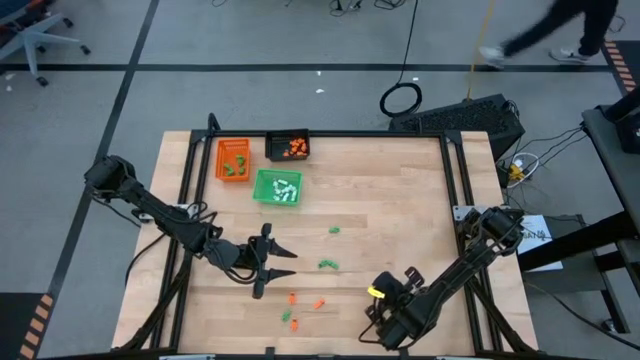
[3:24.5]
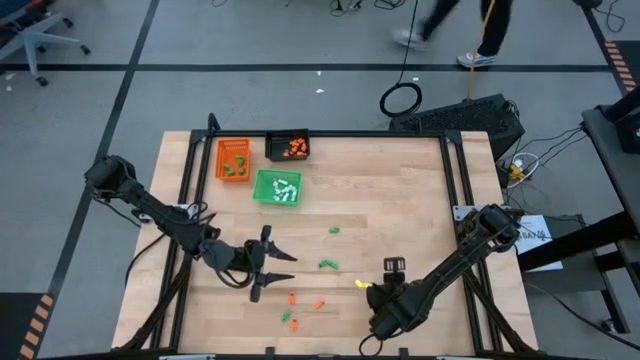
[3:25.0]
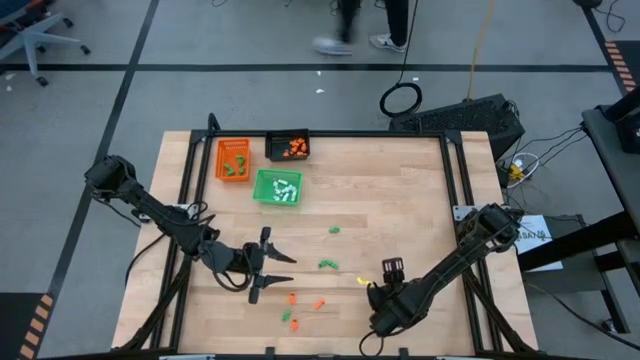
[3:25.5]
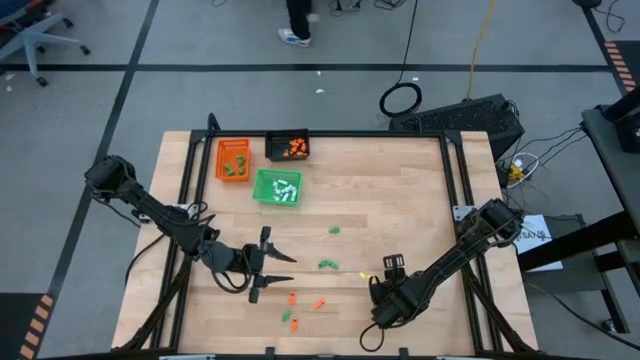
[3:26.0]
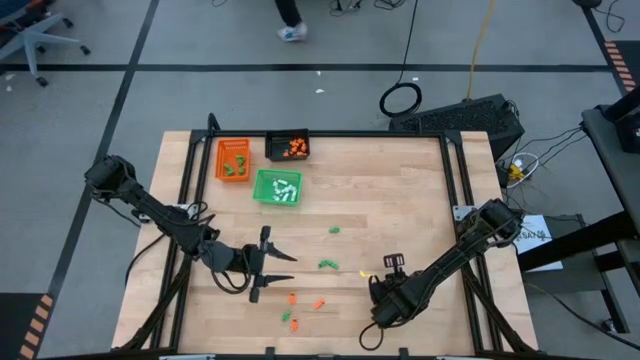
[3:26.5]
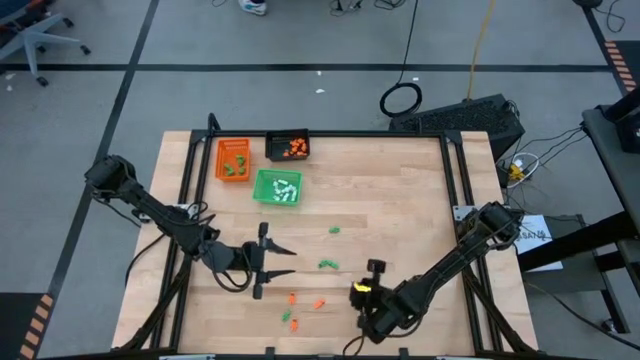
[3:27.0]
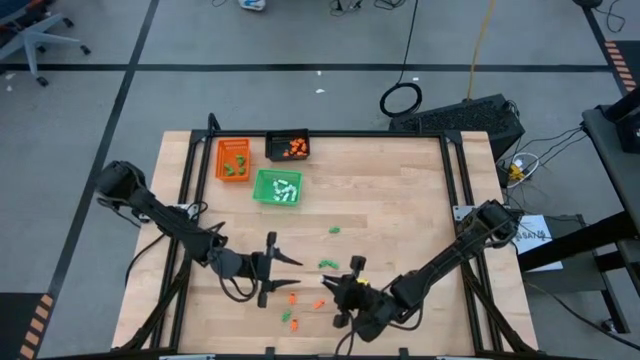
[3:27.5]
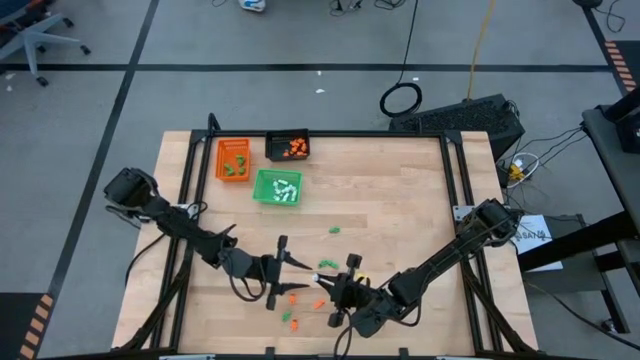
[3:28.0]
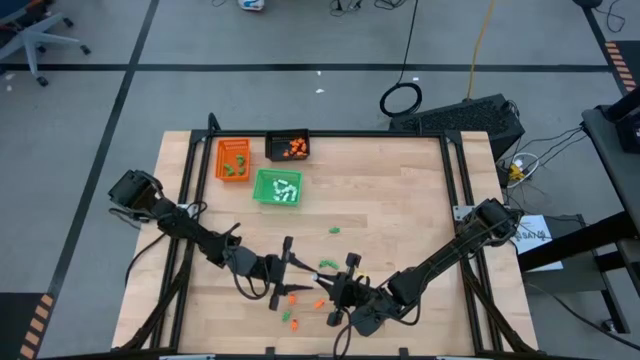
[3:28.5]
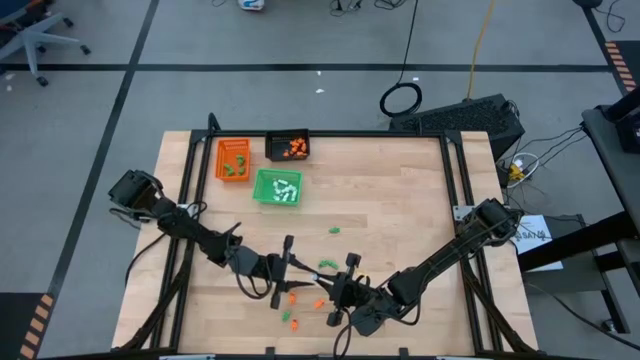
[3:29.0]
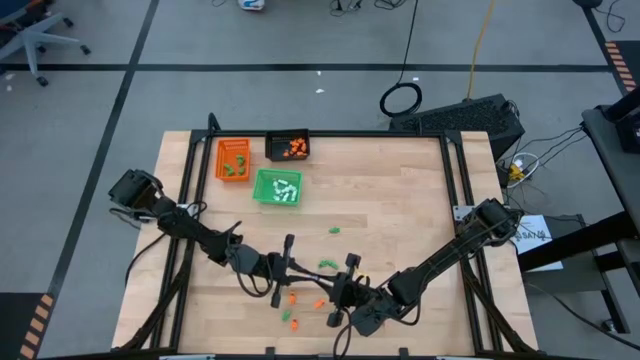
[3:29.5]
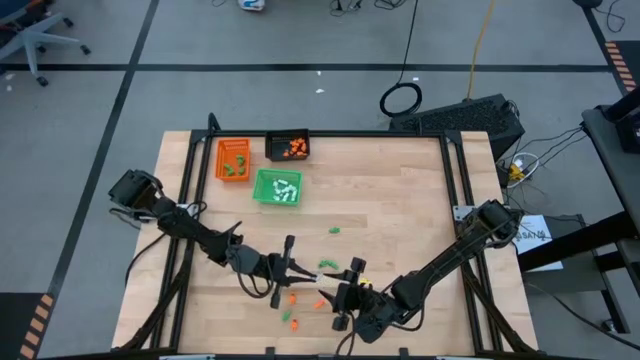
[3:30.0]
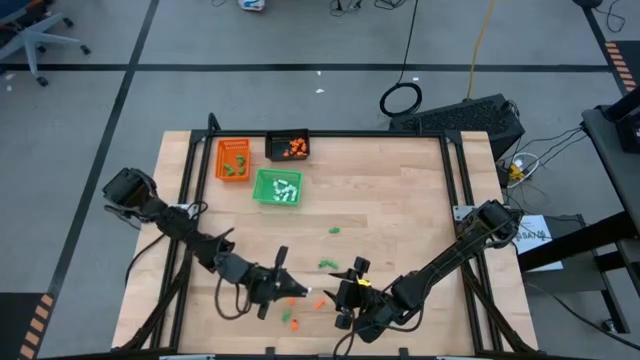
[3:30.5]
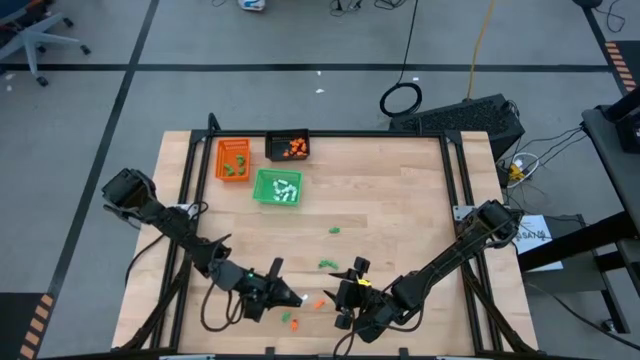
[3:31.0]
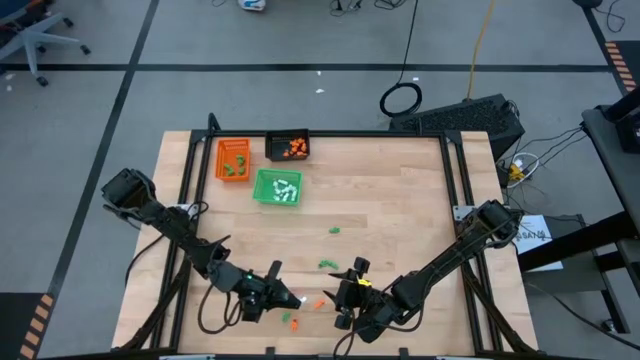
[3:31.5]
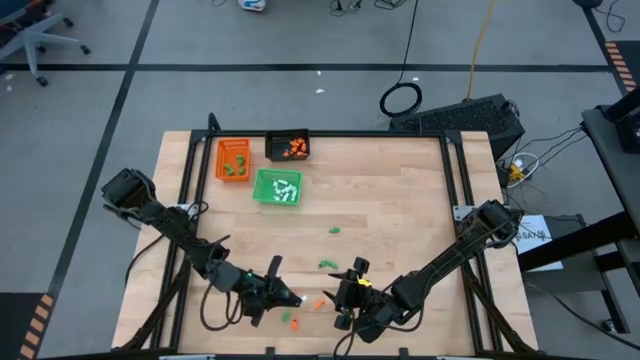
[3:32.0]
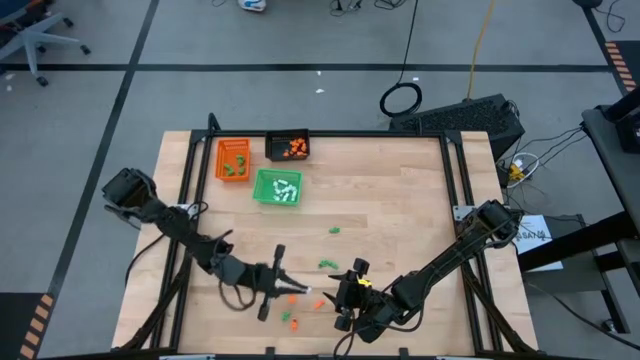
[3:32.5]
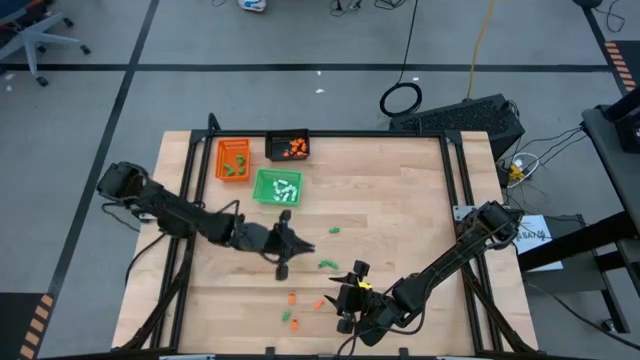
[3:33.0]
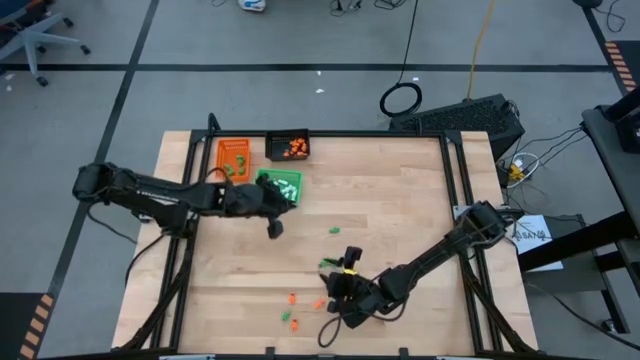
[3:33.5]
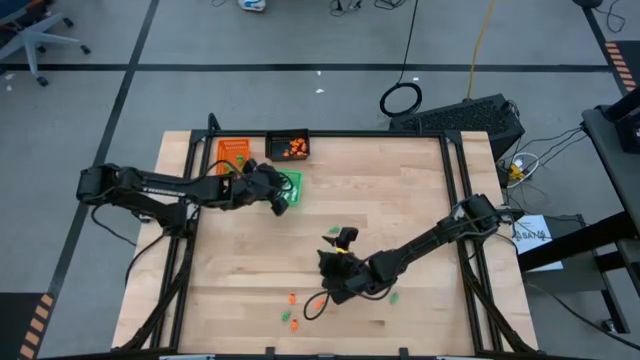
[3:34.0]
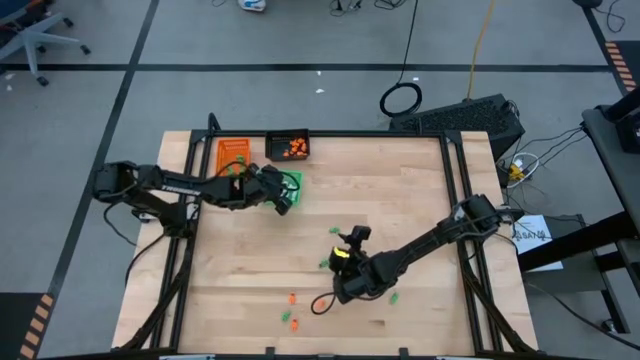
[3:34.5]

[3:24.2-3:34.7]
Task: Sort Halloween decoration
Put the white skeleton toy into the green bin

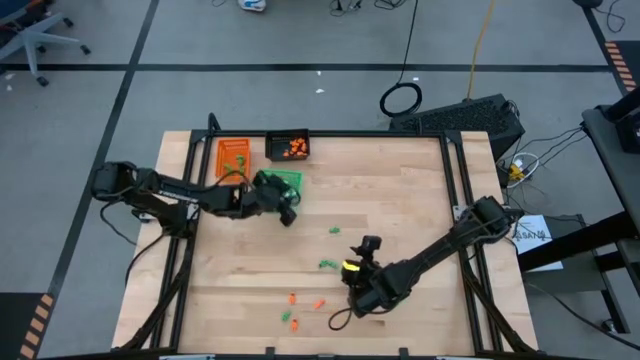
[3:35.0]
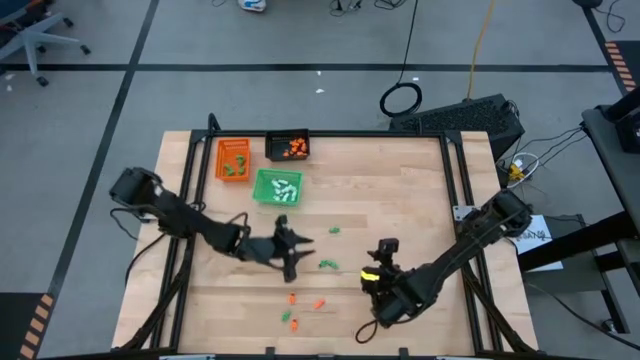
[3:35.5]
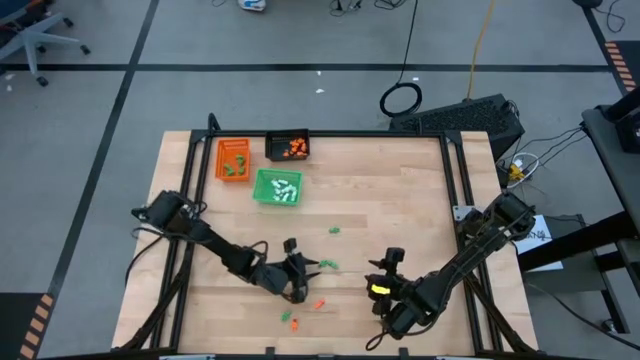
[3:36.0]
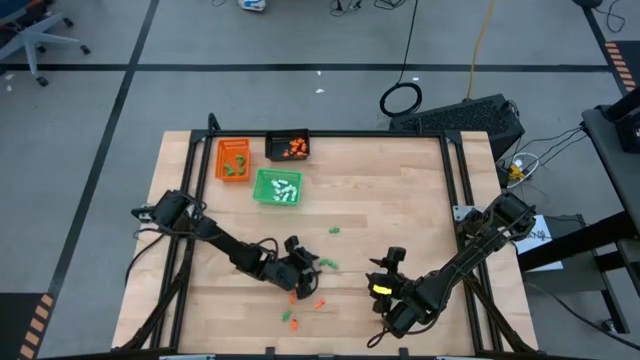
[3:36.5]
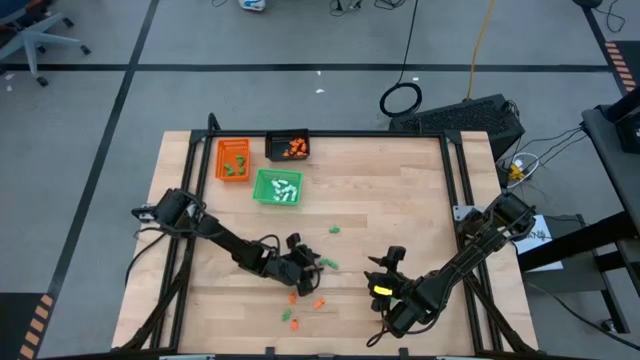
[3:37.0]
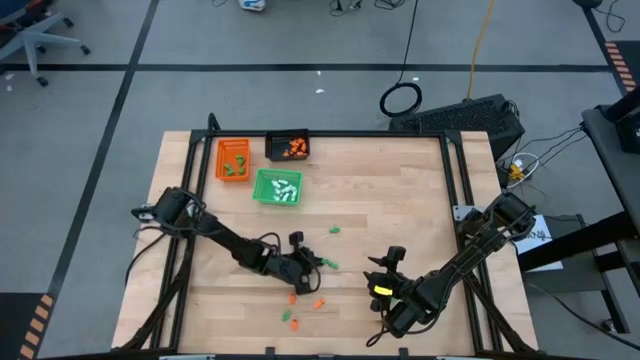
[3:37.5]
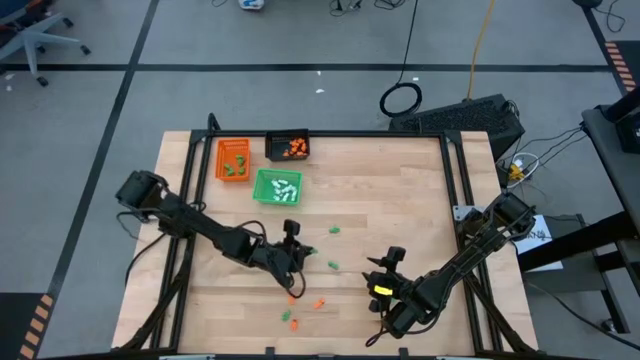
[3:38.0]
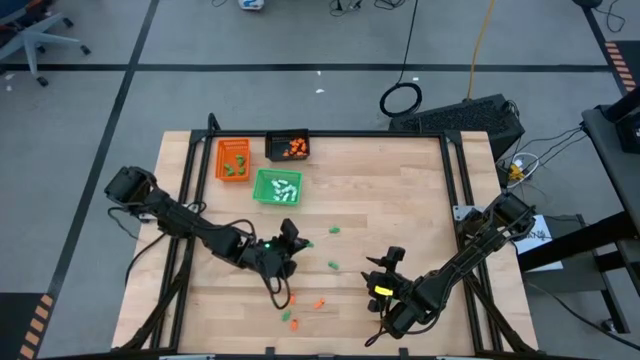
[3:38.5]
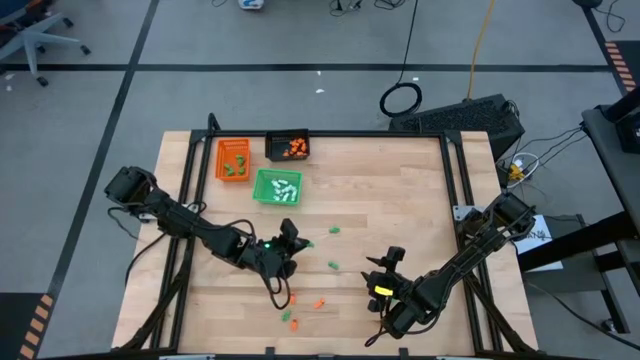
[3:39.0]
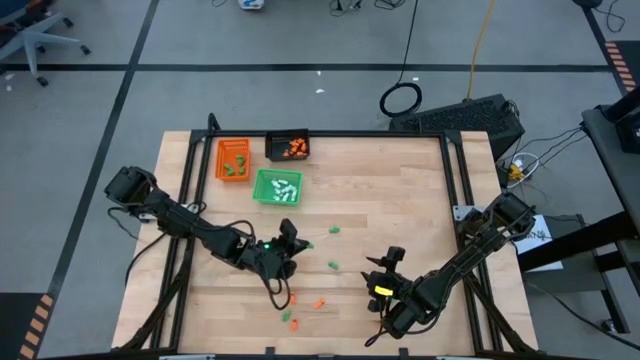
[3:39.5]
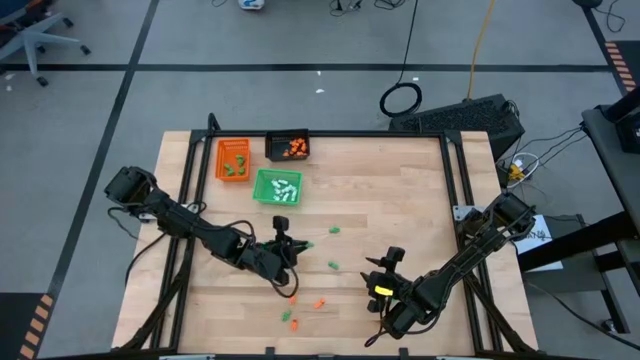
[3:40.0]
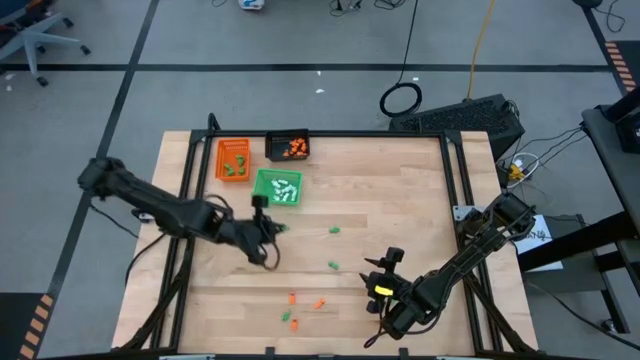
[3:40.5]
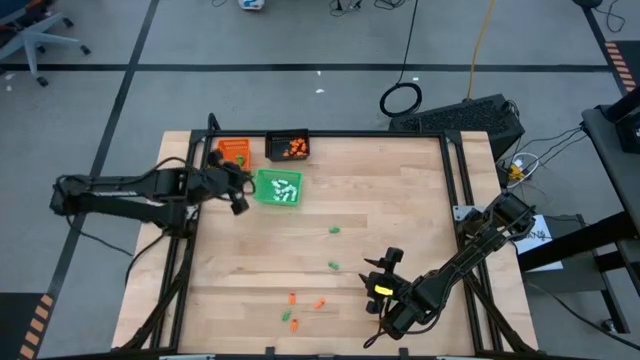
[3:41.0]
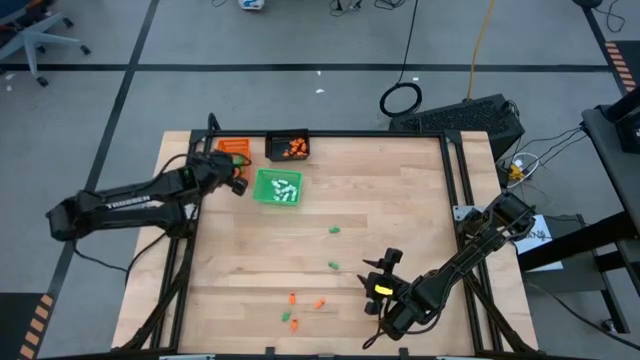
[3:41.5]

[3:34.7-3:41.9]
Put the green skeleton toy into the orange bin

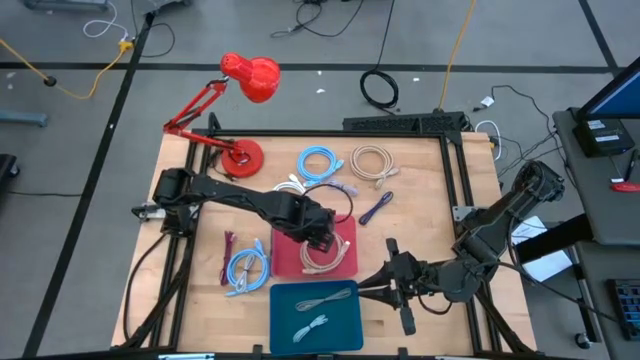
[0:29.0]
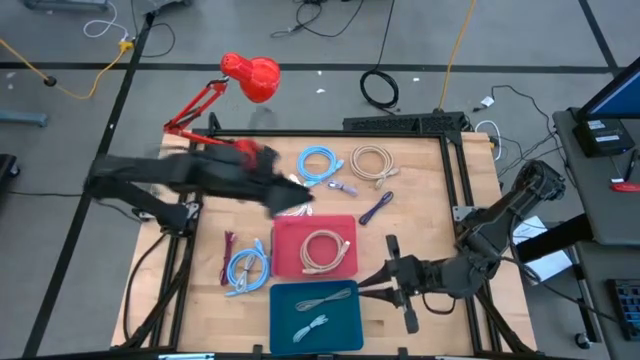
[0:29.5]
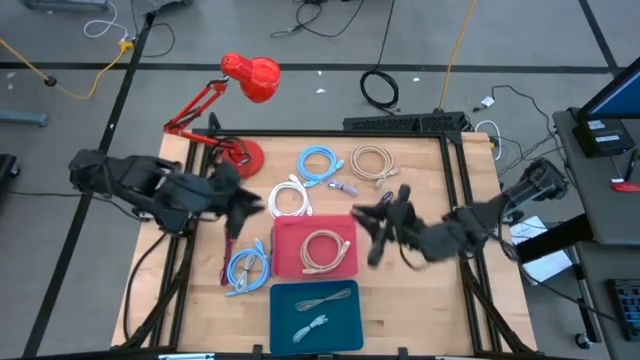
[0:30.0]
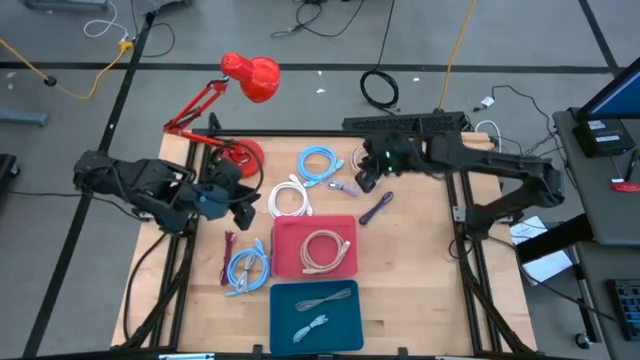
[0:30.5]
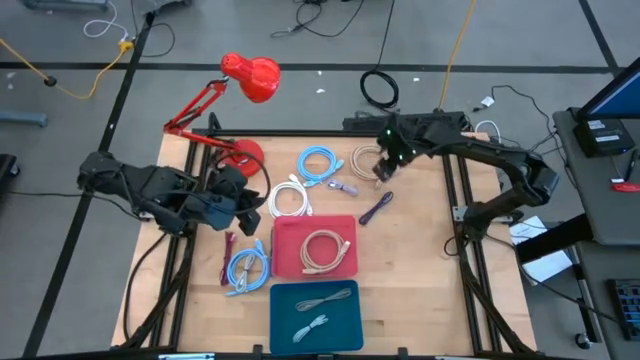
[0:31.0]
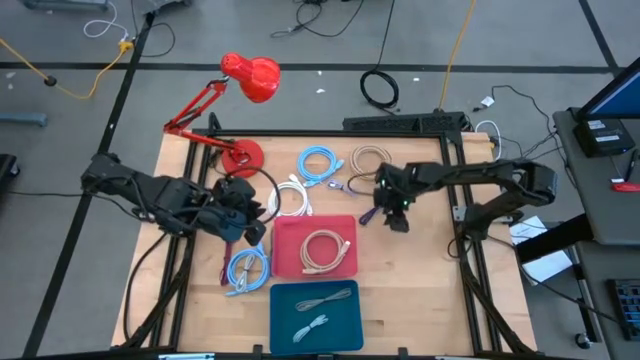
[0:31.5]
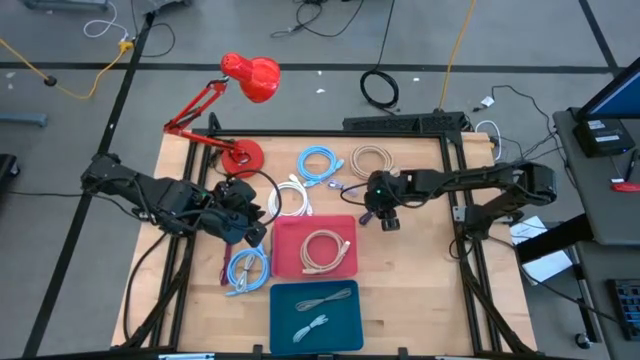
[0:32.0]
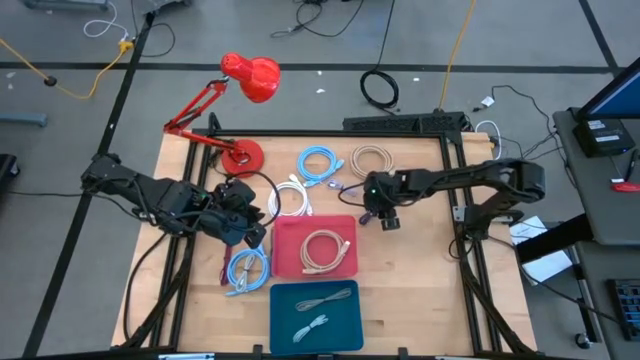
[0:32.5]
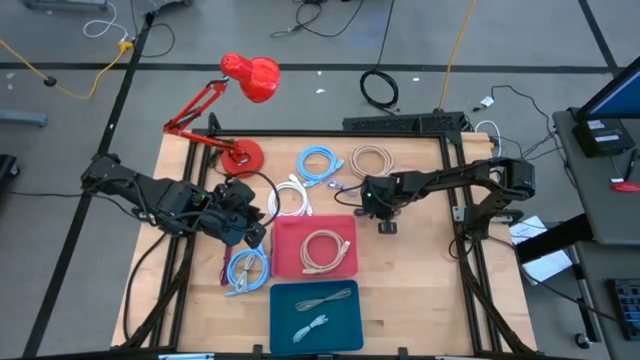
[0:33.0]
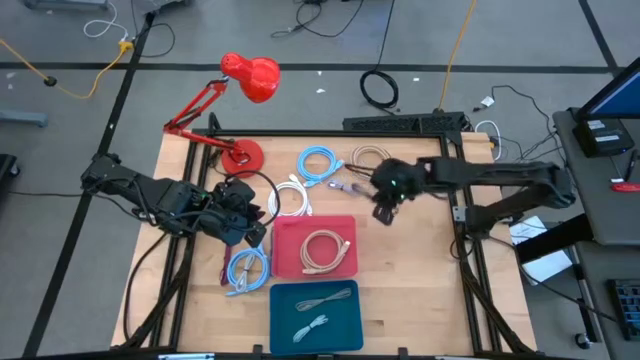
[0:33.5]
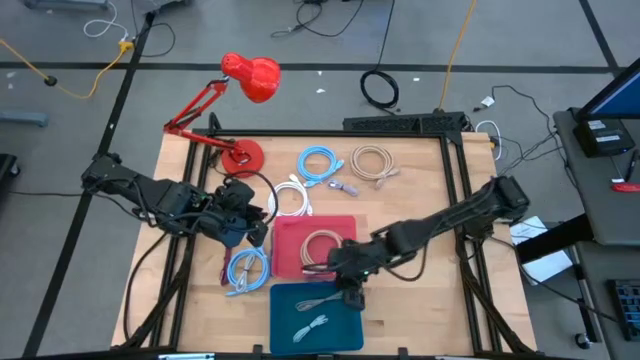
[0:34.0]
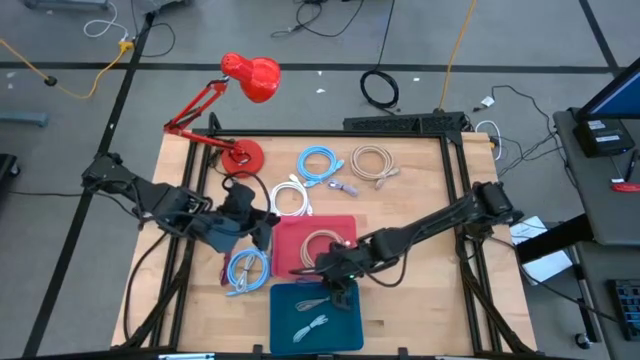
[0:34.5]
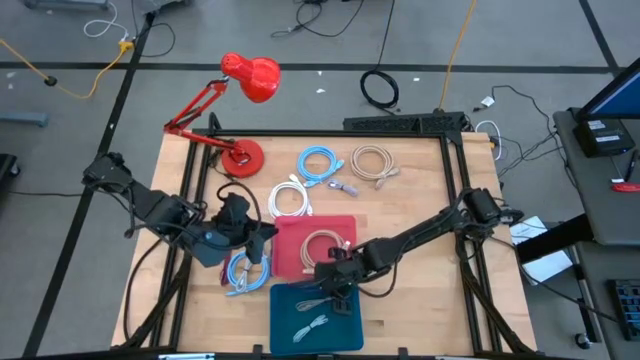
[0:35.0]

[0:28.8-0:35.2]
Task: Pick & Place USB Port
Put the purple and black charger cable into the blue bin
